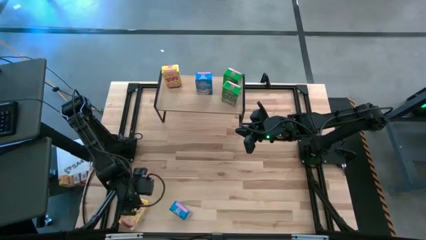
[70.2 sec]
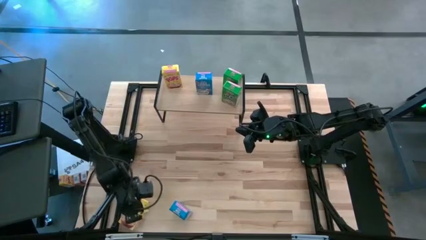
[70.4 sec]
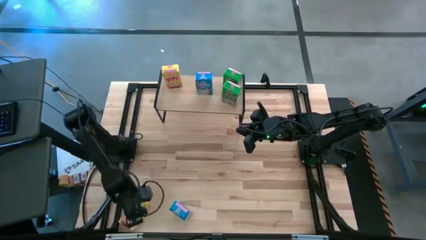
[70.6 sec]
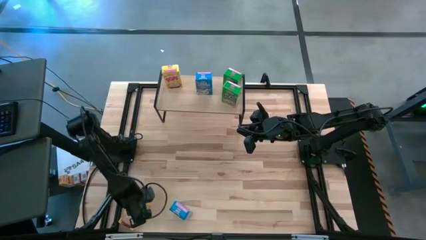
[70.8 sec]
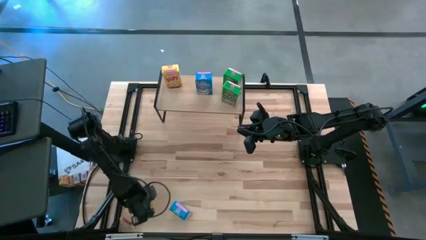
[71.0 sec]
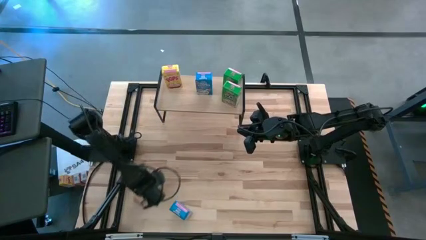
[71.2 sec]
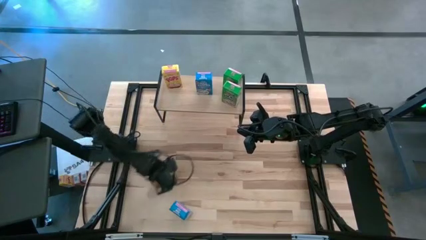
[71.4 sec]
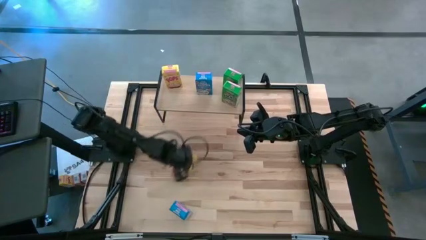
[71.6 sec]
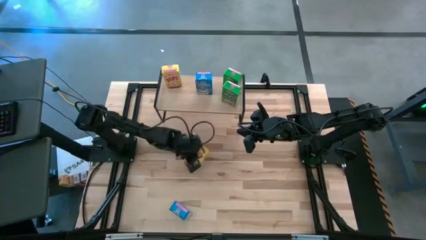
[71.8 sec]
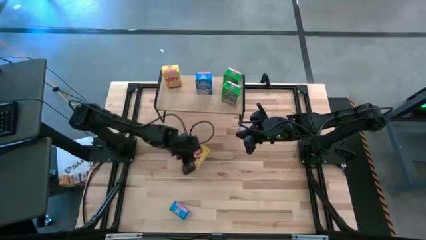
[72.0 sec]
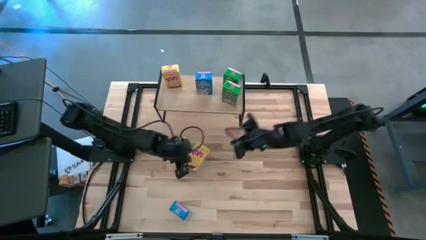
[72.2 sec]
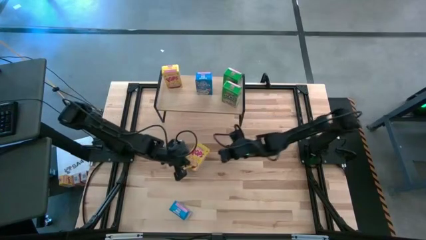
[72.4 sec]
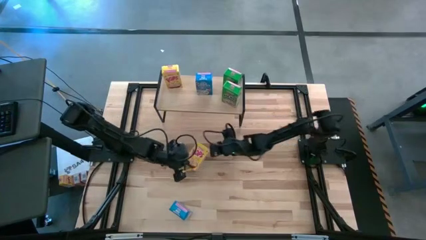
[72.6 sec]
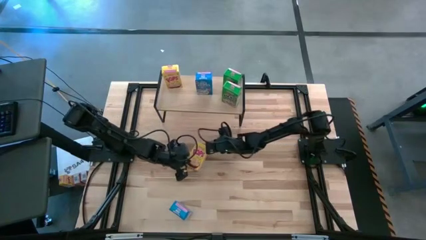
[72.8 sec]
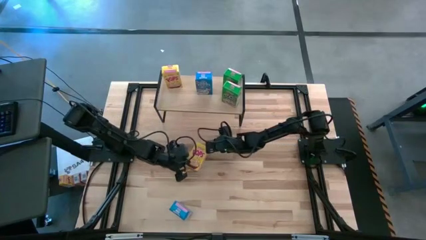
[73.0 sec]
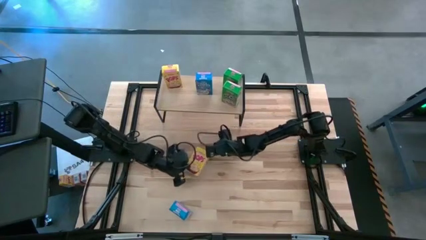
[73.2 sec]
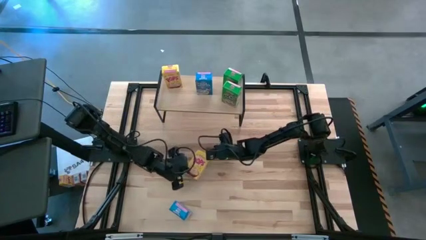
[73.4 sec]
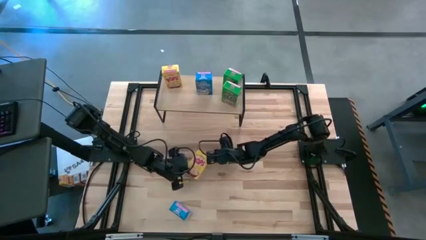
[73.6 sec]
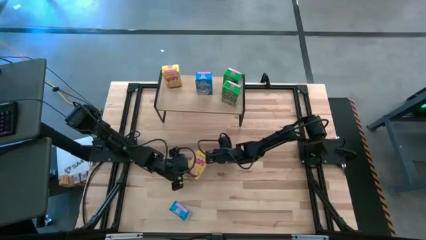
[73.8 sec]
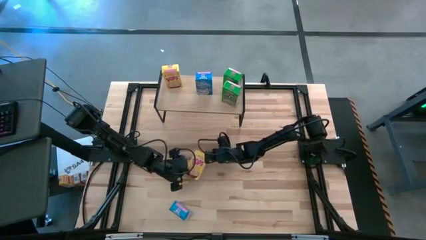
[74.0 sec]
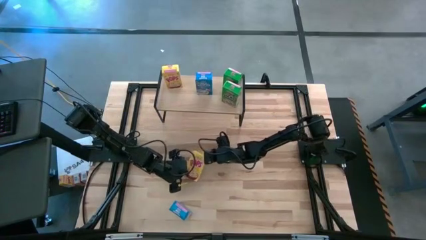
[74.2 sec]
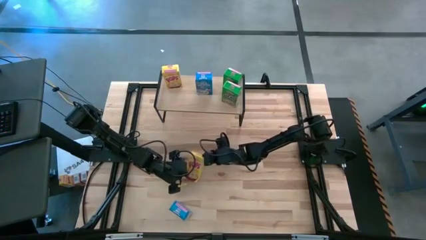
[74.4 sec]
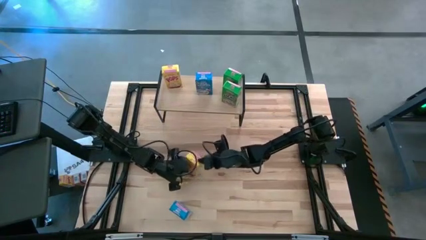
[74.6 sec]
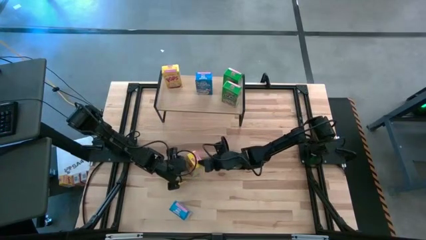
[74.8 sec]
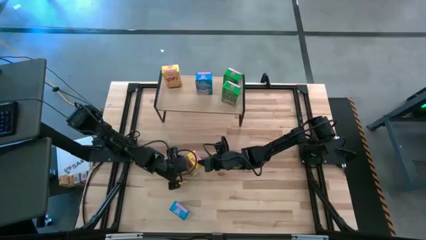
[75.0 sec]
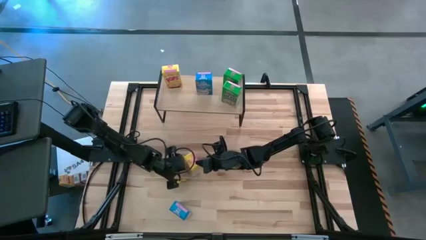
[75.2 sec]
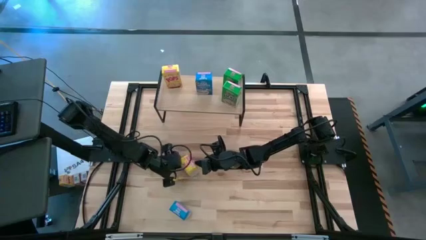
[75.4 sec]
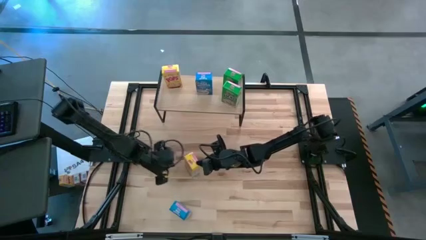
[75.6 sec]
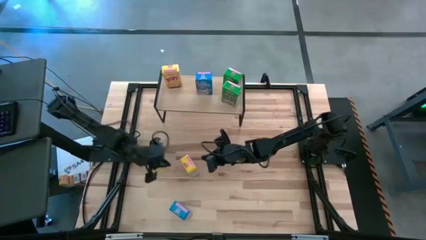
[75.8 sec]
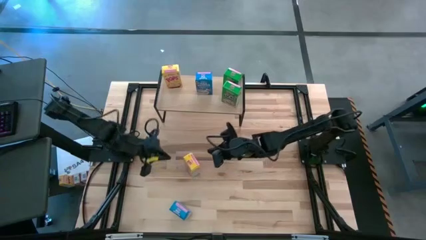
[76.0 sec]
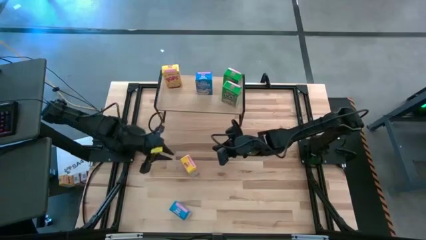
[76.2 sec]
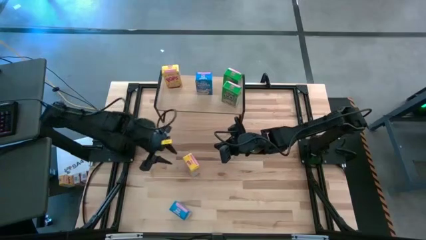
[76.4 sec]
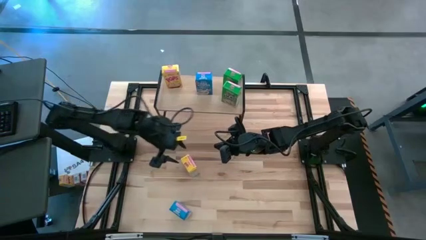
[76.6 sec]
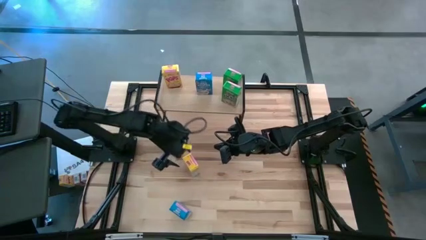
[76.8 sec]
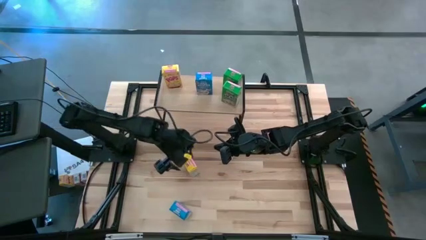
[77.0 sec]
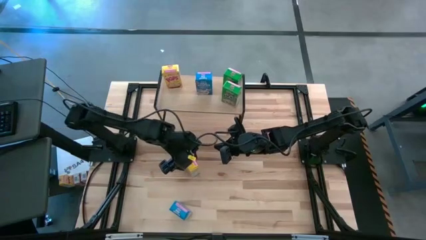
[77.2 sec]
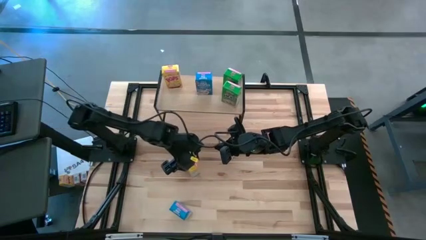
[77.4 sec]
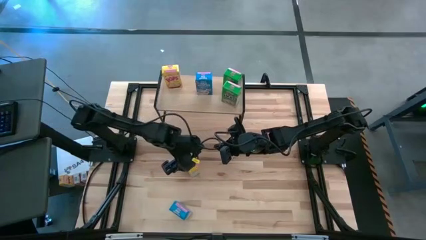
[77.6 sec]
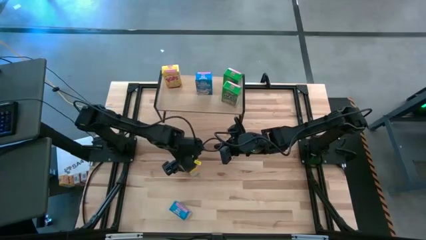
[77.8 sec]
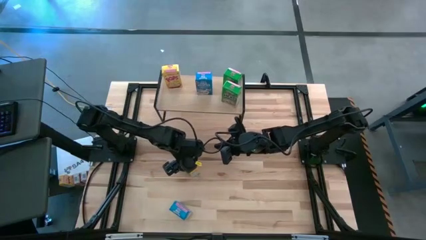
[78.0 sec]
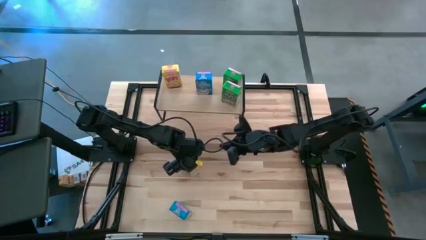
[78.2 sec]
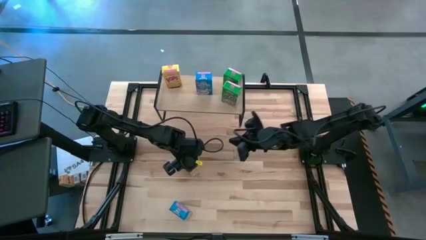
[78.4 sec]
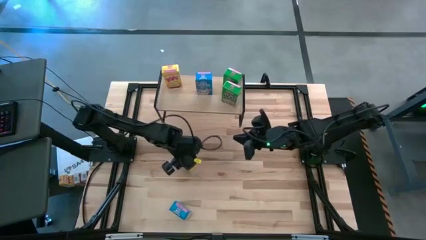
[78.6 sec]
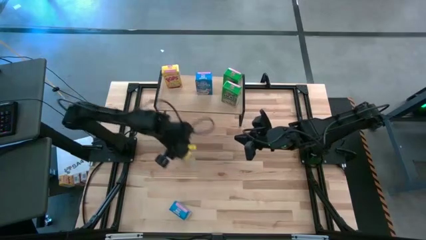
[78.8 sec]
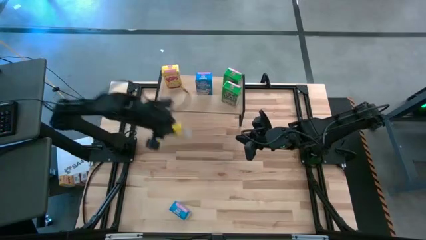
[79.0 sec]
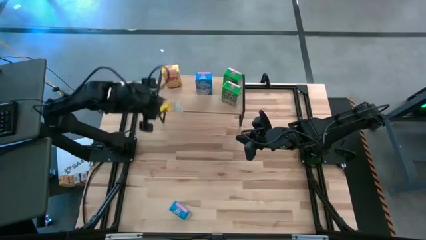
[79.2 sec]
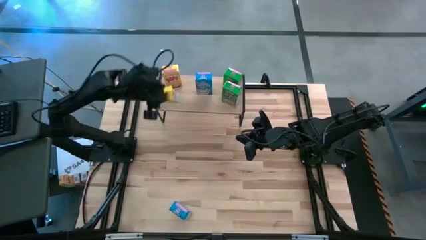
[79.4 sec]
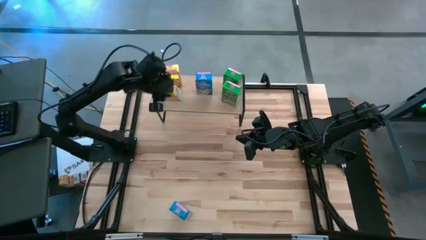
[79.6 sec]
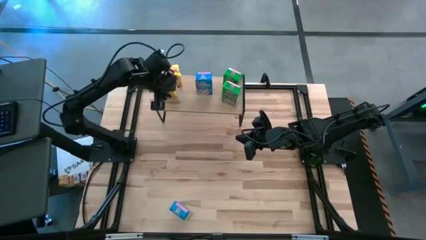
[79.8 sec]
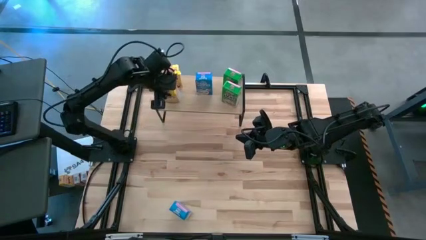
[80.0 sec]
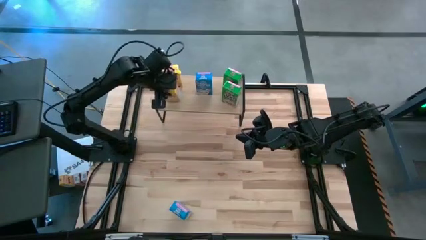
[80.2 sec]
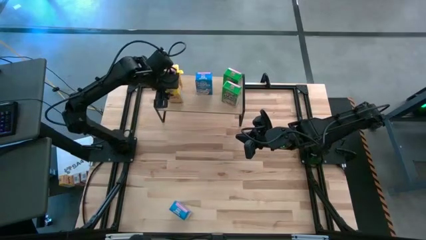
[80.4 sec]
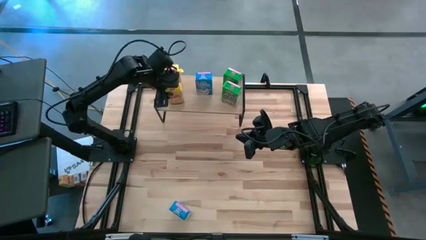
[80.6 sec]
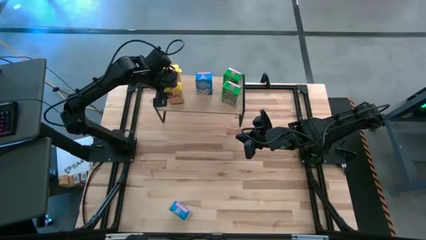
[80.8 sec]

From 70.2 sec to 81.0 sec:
Task: Stack cereal on shelf
Put the yellow cereal box on the shelf aligned with the other yellow cereal box

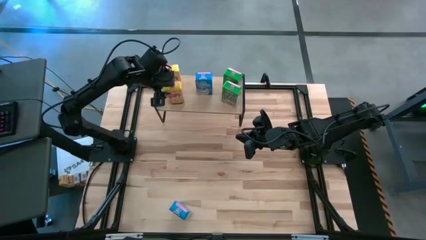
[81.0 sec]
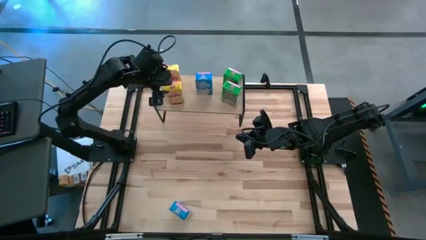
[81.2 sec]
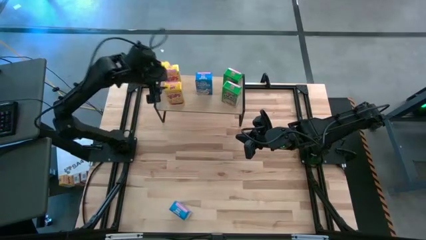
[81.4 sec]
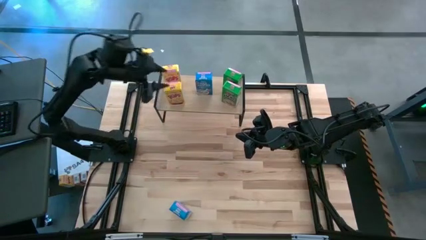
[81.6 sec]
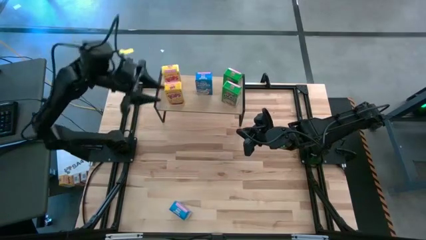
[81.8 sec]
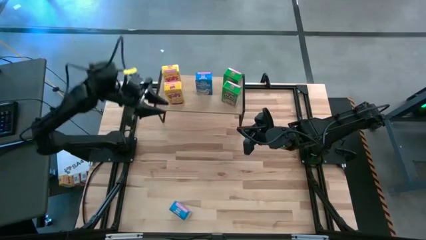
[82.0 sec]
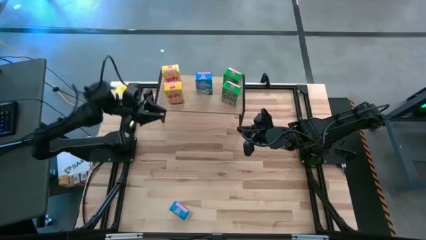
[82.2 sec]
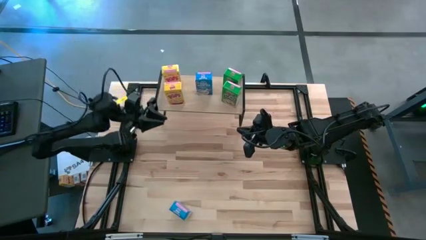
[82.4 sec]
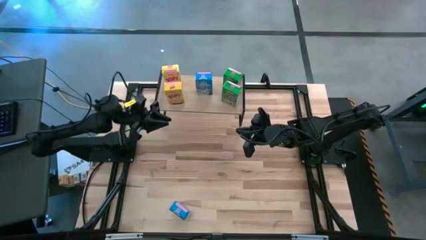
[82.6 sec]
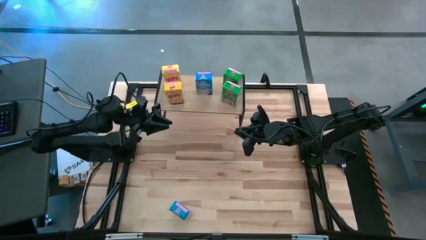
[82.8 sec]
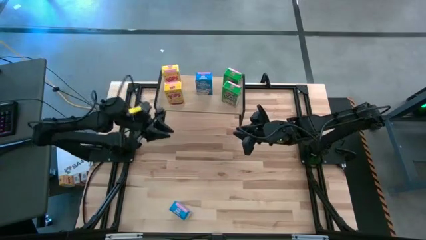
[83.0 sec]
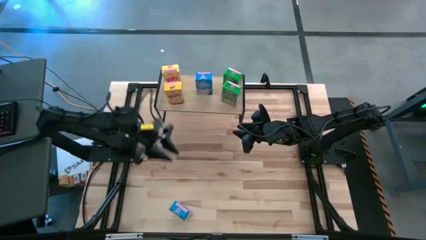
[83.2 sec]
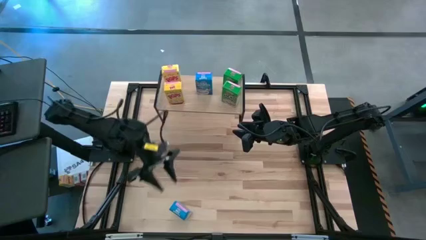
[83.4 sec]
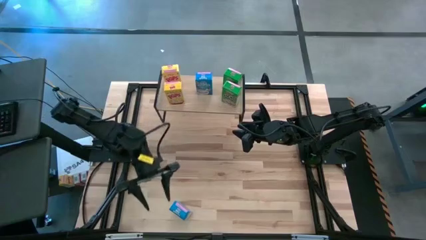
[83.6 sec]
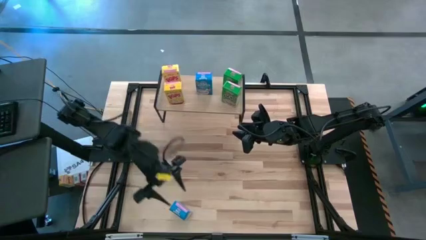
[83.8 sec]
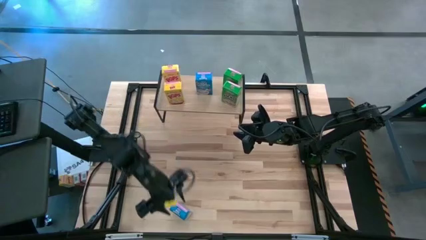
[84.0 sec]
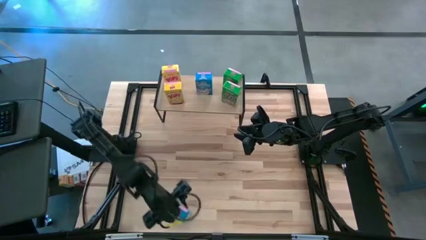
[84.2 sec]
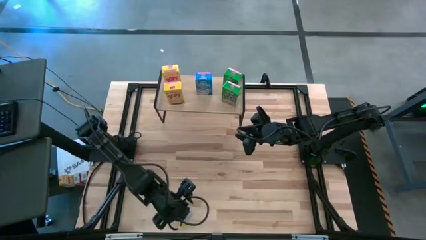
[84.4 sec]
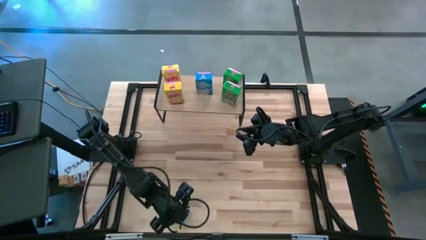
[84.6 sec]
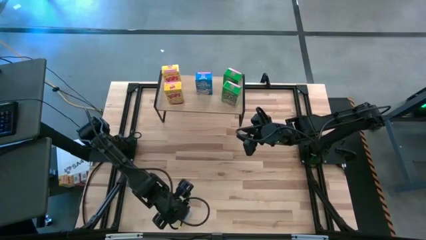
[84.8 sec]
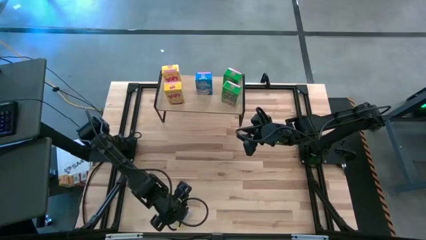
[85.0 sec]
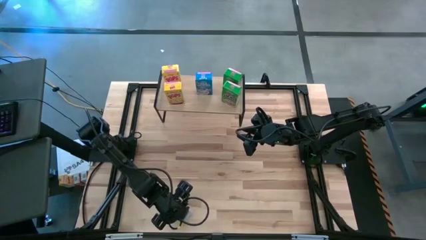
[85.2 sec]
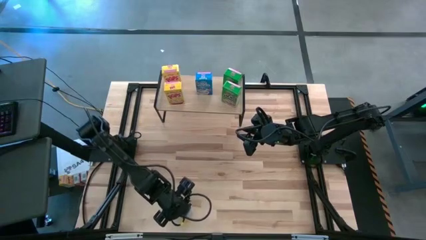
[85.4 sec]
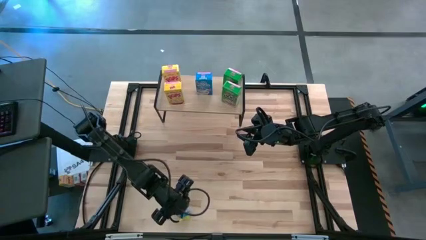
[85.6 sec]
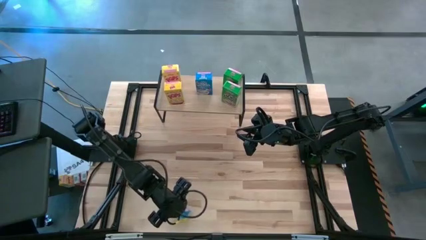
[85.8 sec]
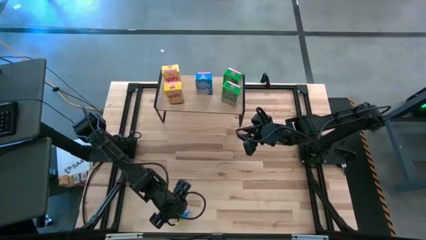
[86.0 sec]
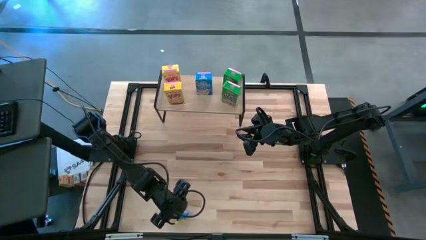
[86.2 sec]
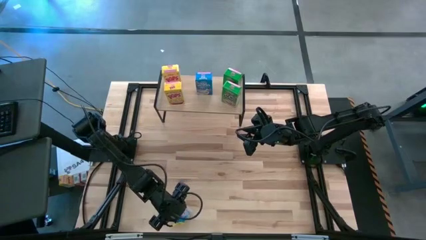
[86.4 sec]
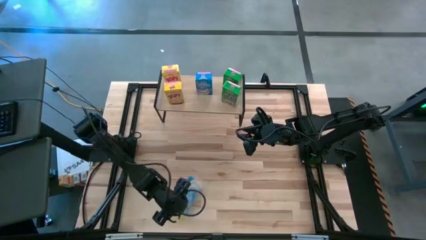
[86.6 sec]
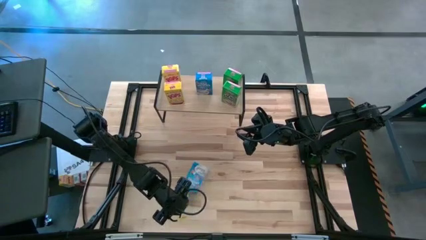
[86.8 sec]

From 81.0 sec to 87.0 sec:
Put the blue cereal box on the shelf aligned with the other blue cereal box
